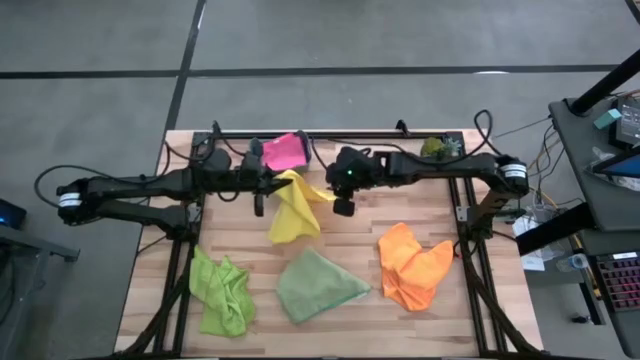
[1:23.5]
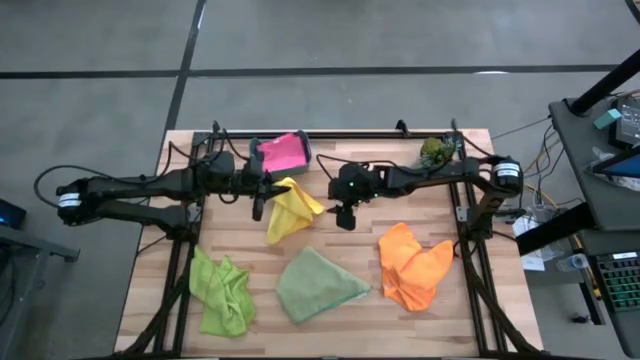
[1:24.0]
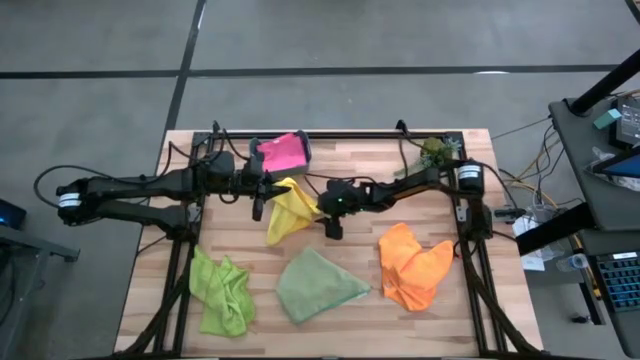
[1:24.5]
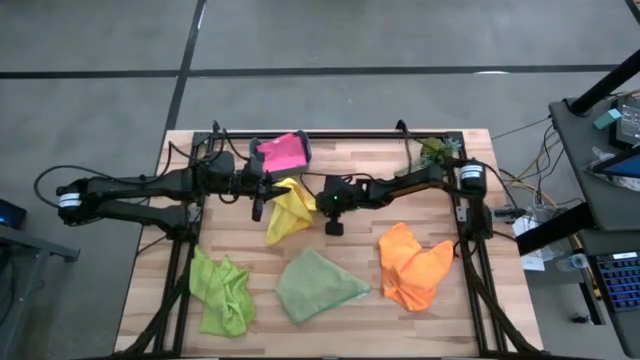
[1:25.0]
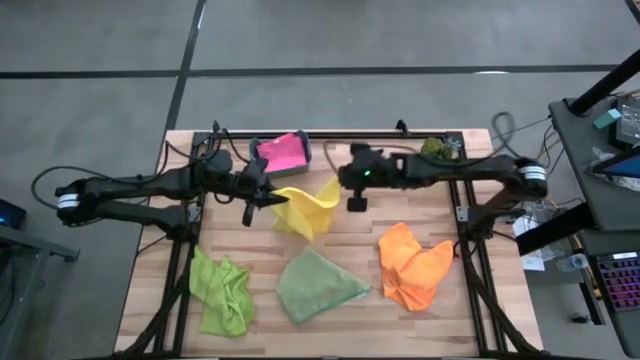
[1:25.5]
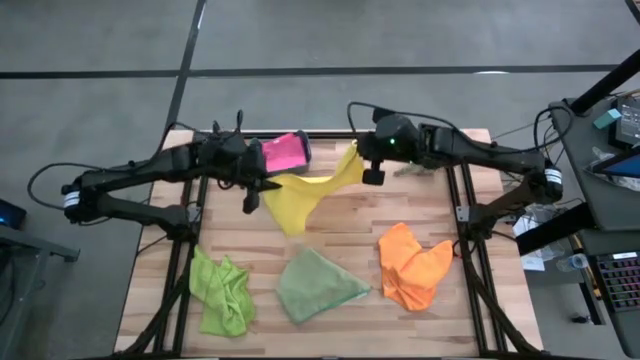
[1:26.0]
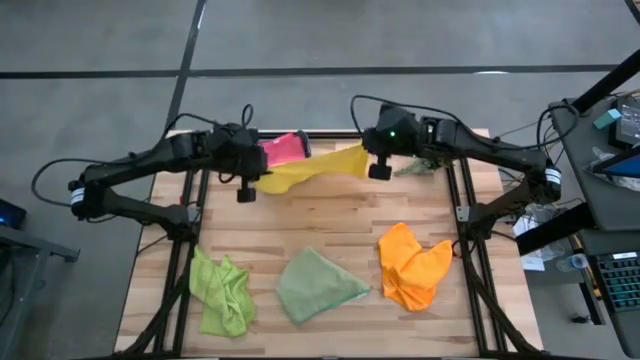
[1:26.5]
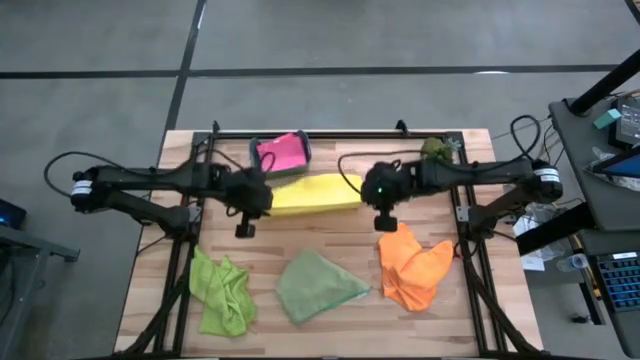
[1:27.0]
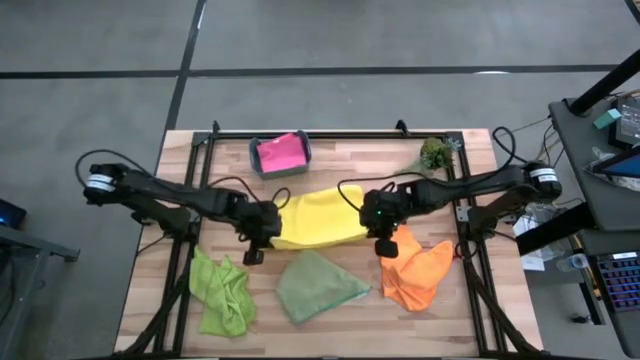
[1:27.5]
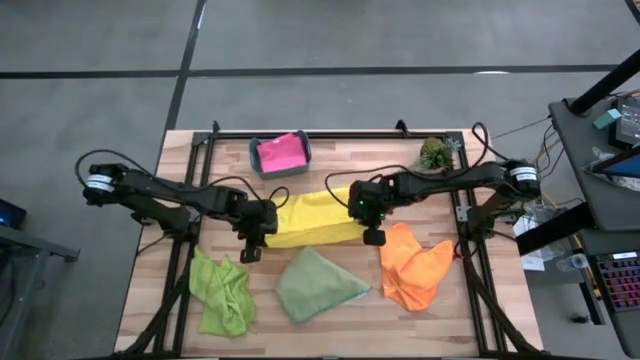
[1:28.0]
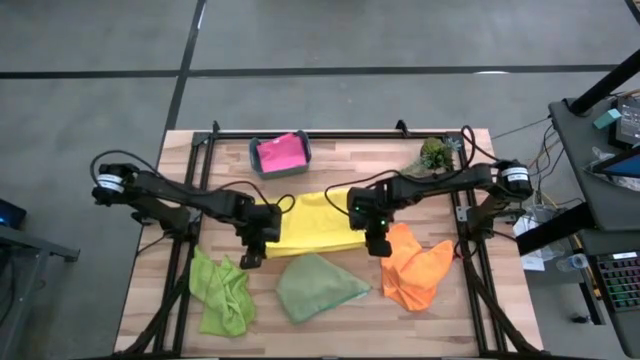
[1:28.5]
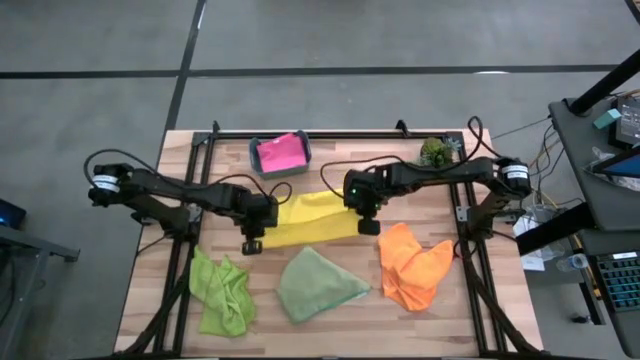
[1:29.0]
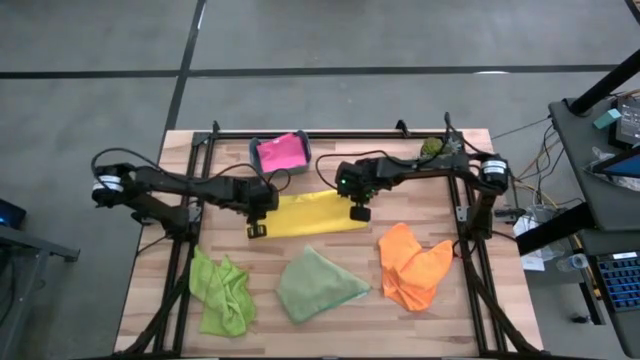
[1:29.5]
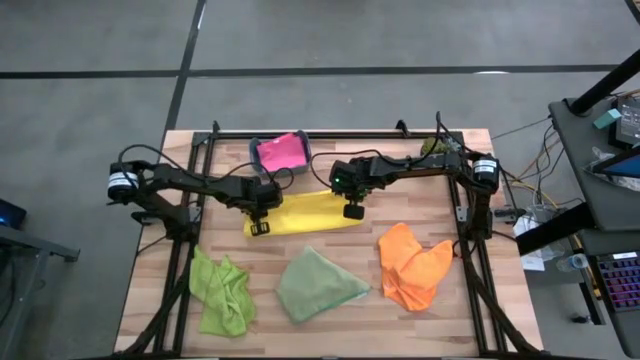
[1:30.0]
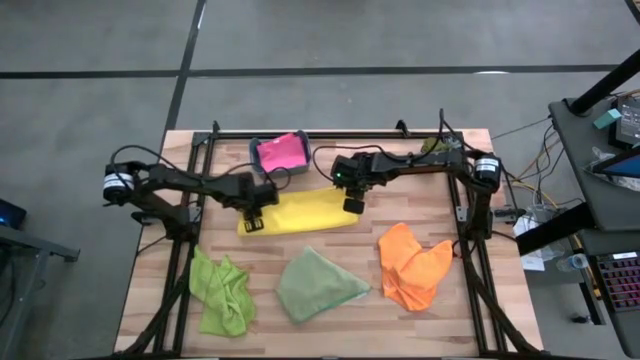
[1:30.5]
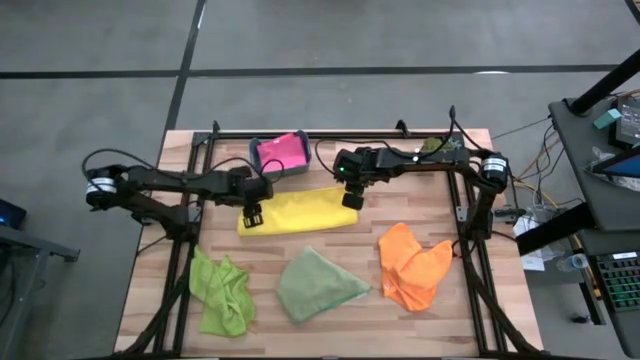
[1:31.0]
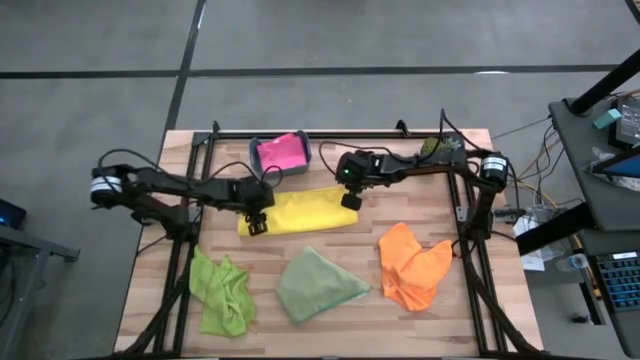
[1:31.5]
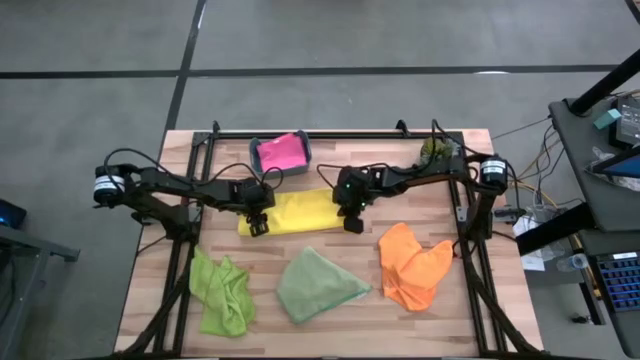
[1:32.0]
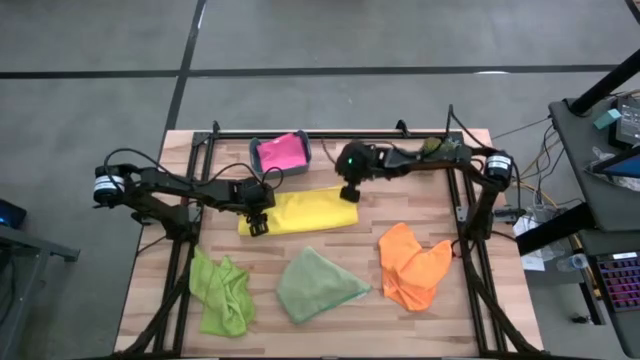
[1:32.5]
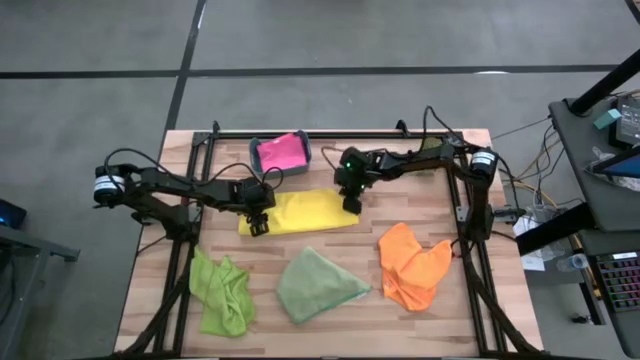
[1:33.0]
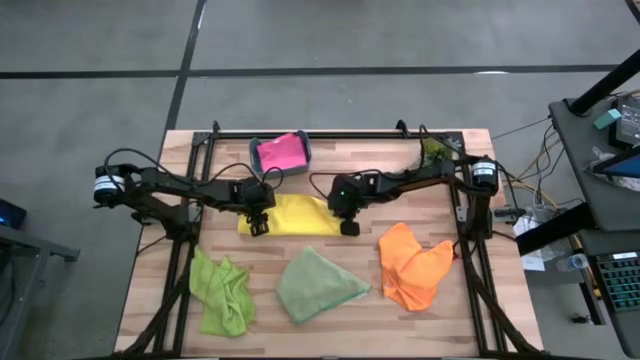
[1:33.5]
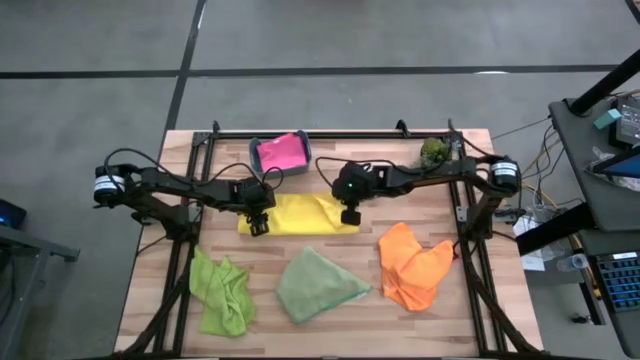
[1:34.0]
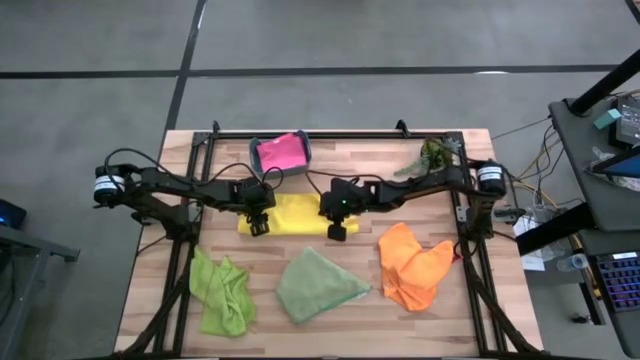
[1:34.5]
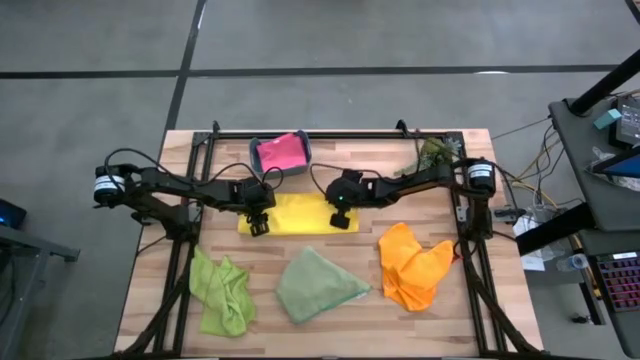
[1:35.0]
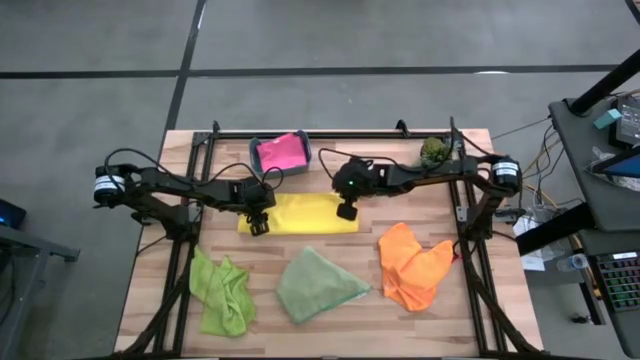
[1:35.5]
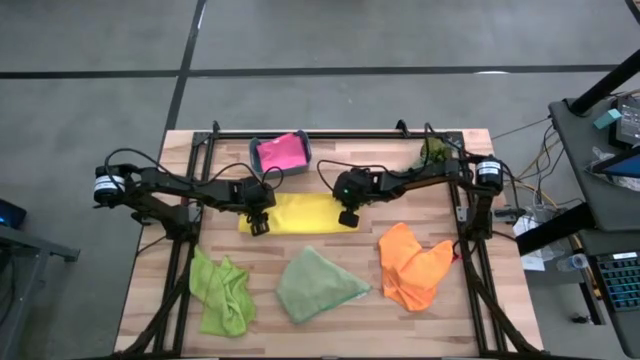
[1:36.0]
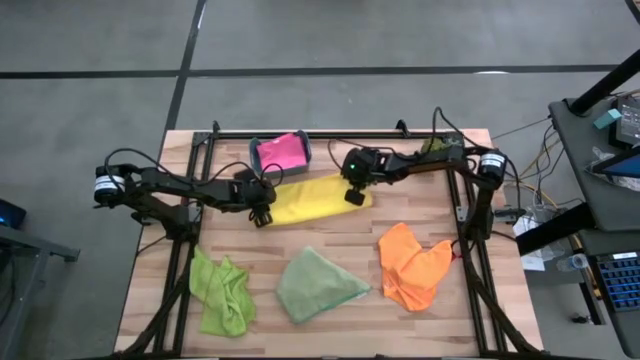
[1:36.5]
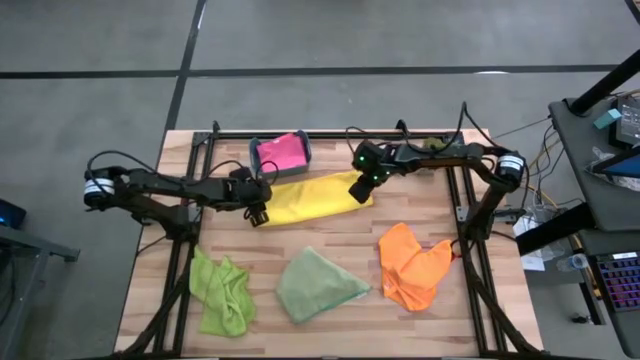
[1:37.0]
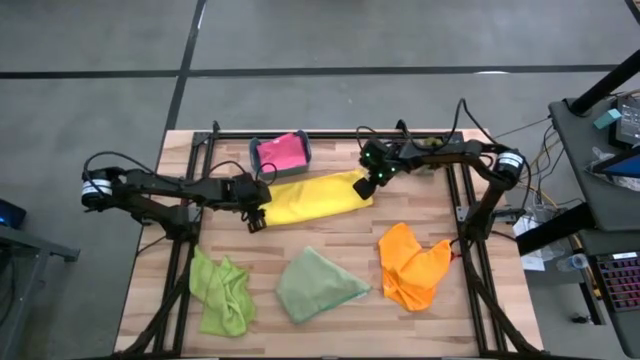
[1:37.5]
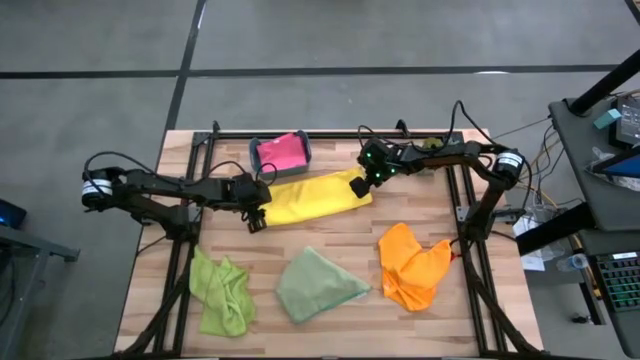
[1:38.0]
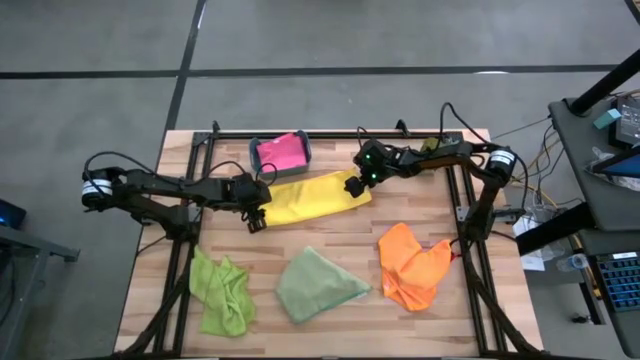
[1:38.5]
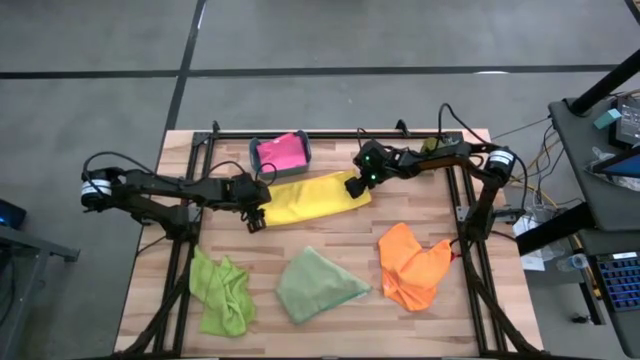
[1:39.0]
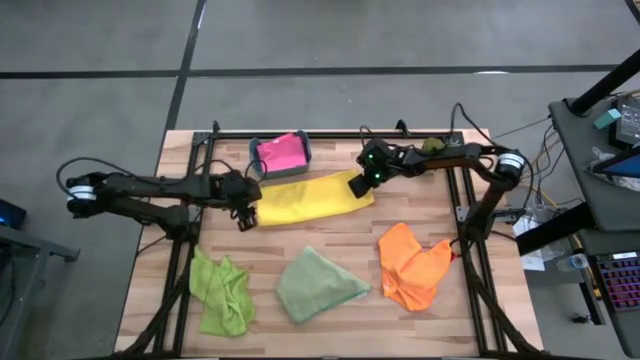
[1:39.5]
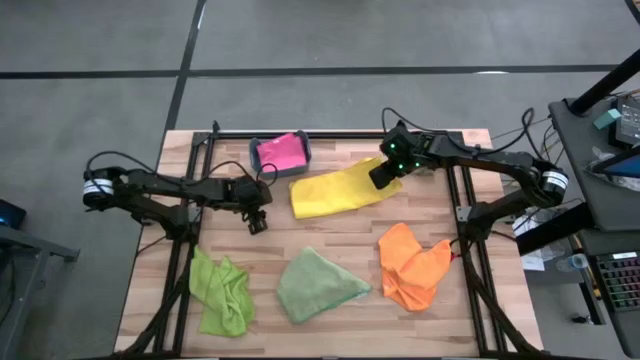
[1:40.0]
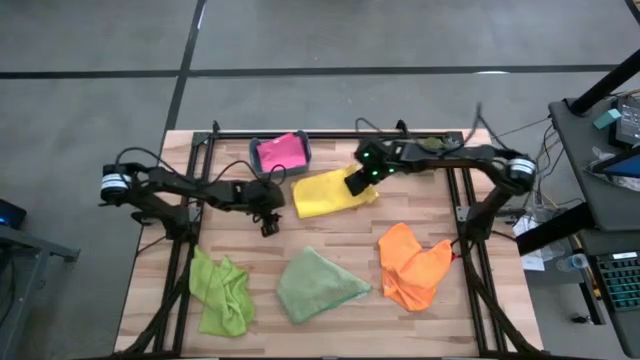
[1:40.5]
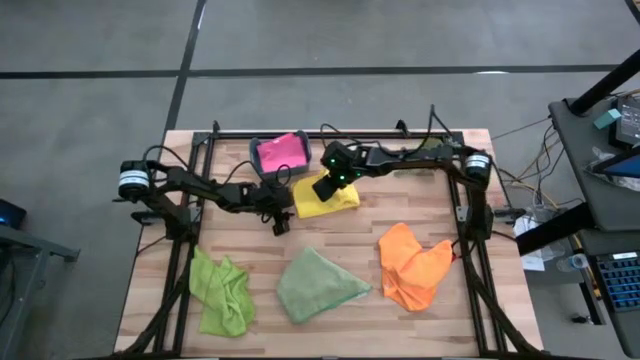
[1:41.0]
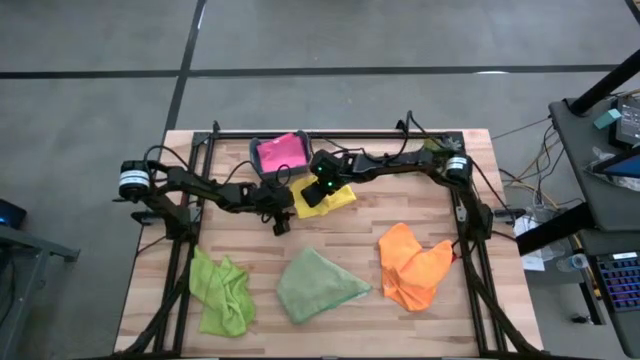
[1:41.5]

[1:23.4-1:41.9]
Task: Fold microfiber towels
Fold the yellow microfiber towel

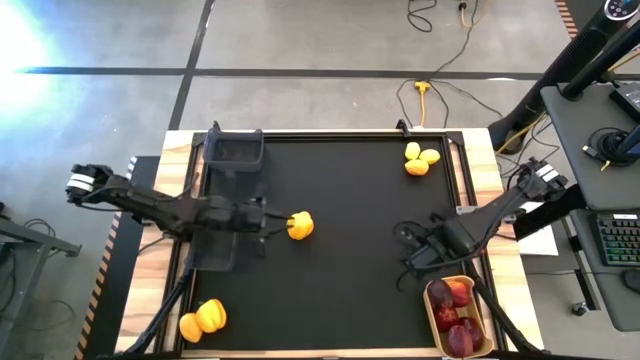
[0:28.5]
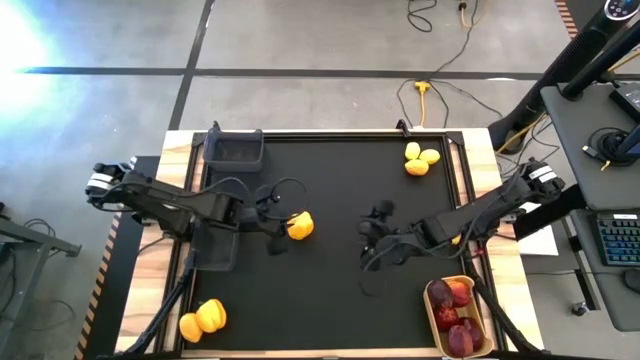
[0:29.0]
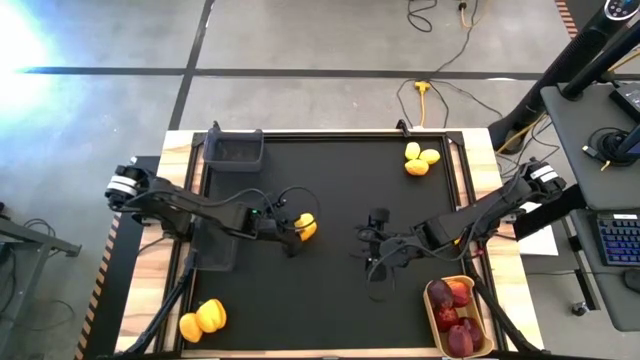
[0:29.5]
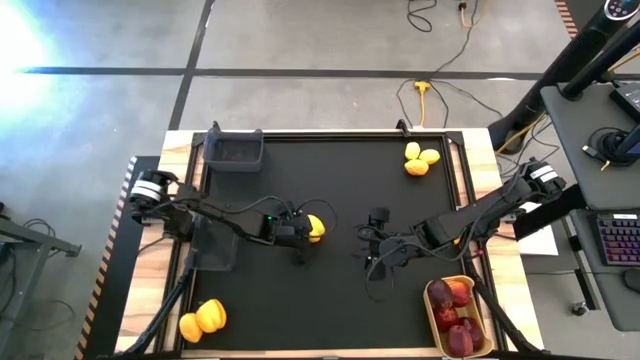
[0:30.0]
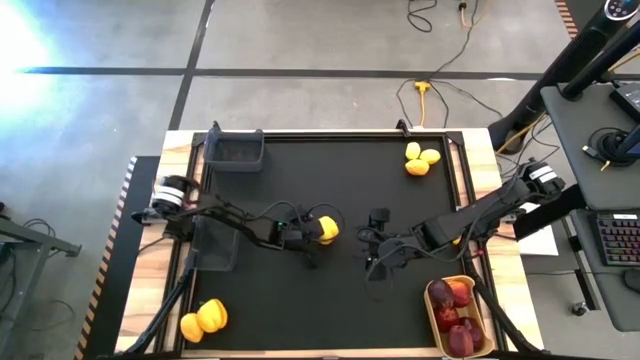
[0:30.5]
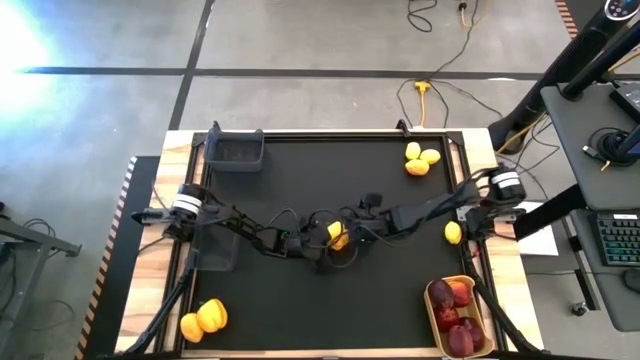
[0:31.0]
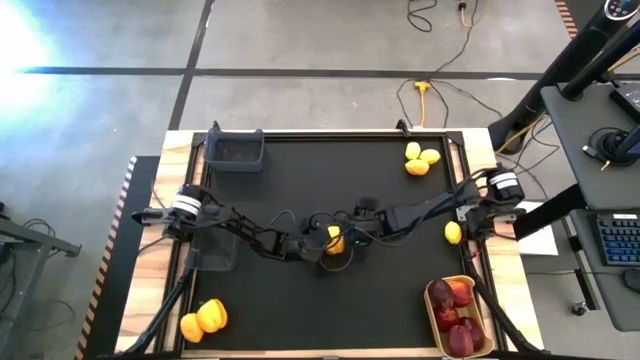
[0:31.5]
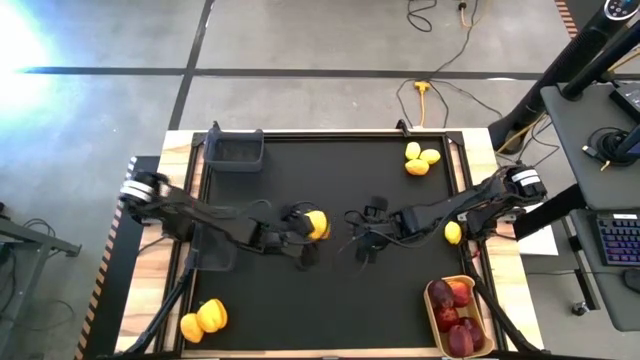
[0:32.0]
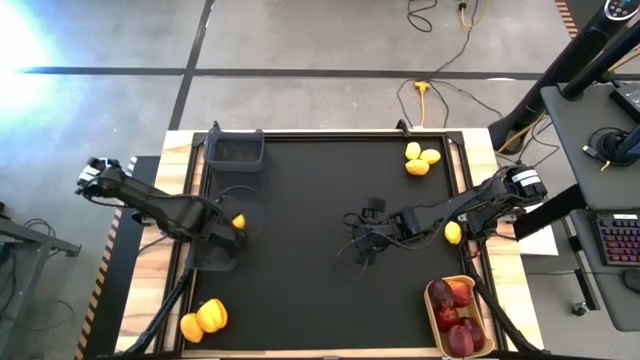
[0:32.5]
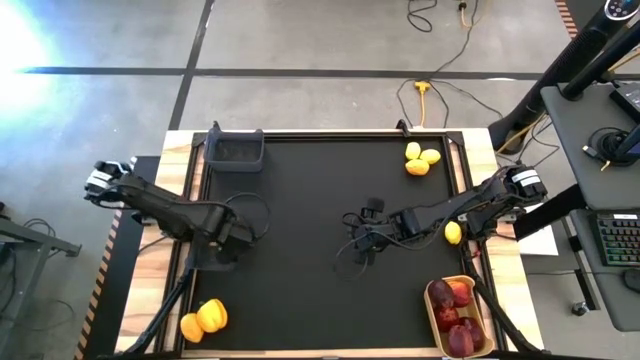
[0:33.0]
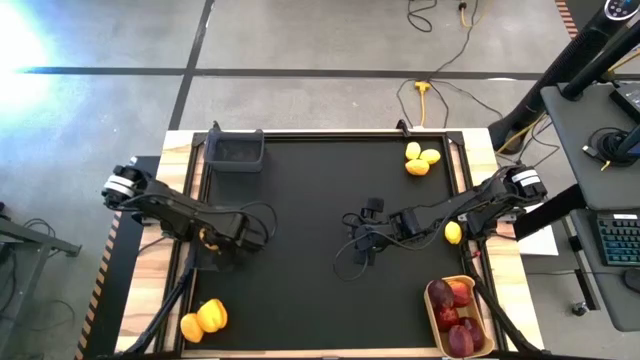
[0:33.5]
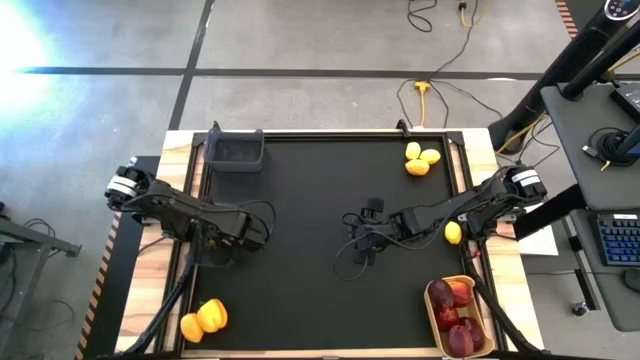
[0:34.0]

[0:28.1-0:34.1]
Task: Sort produce into baskets
Put the bell pepper into the bottom black bin
